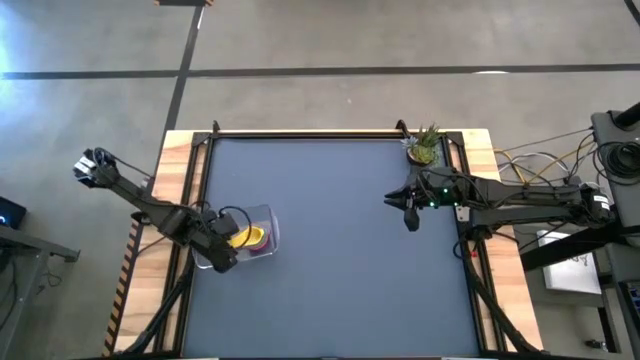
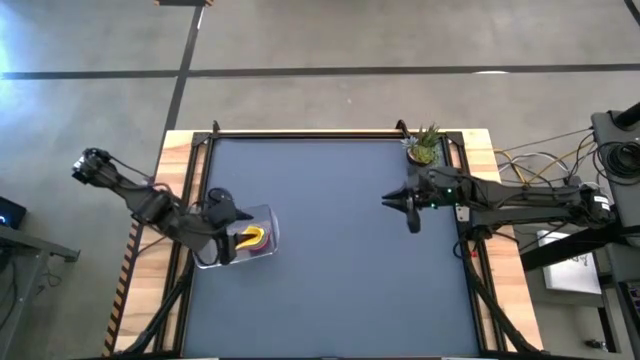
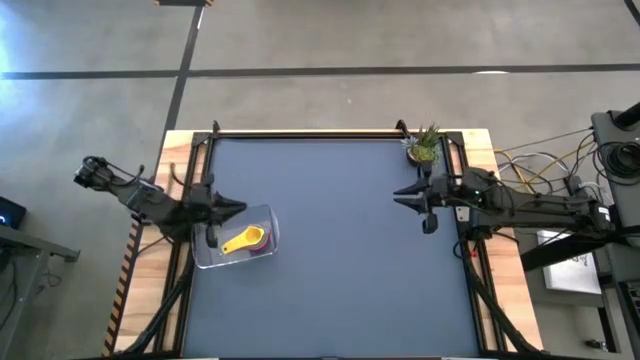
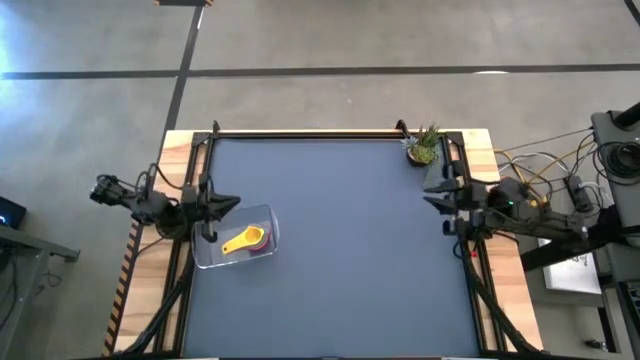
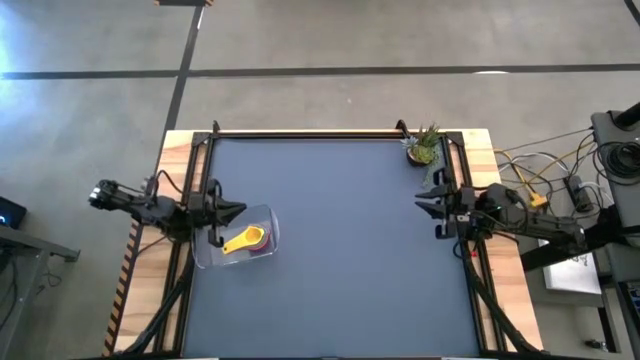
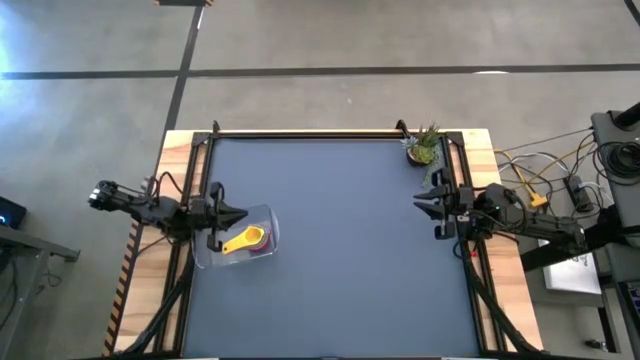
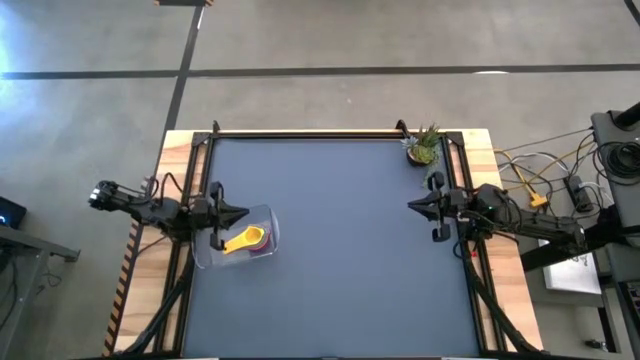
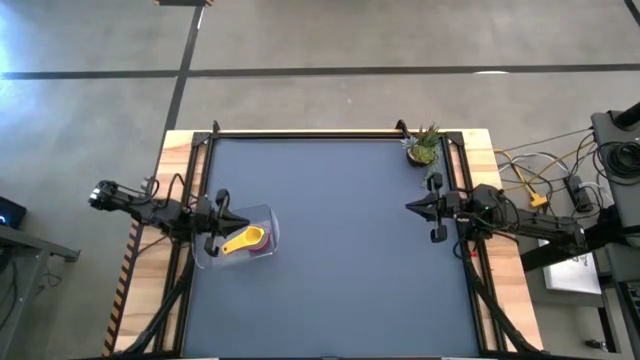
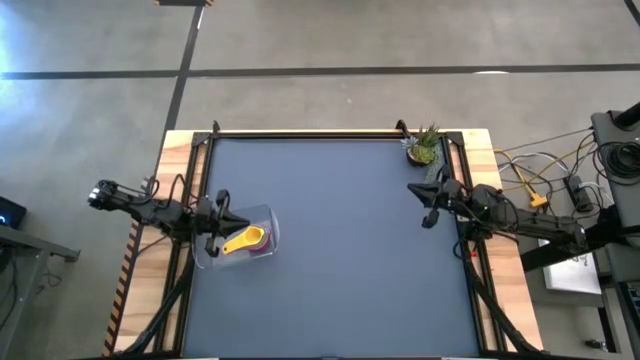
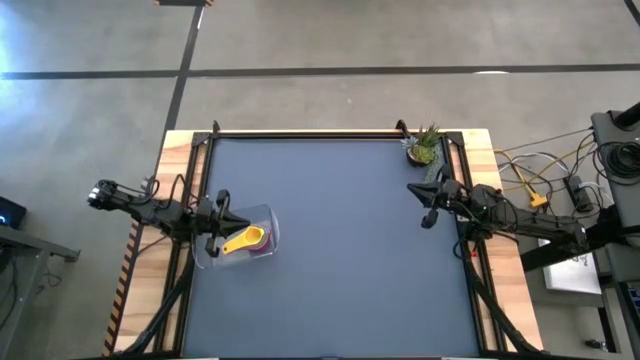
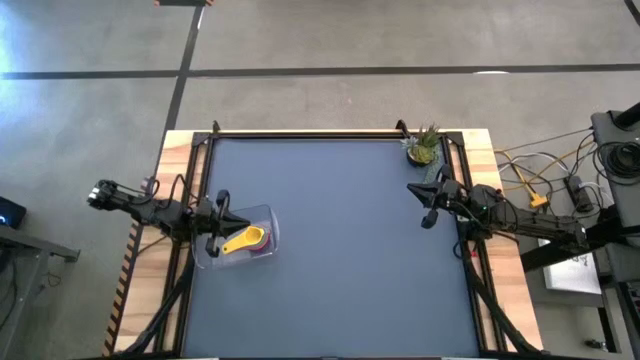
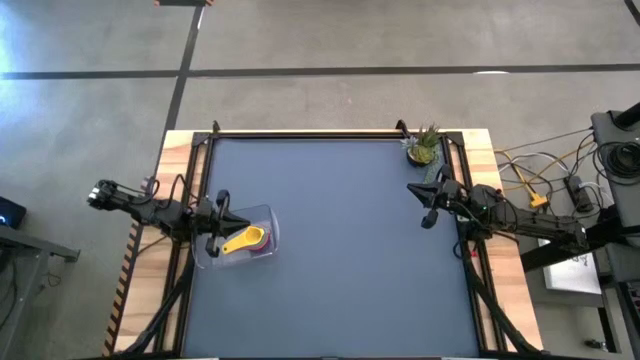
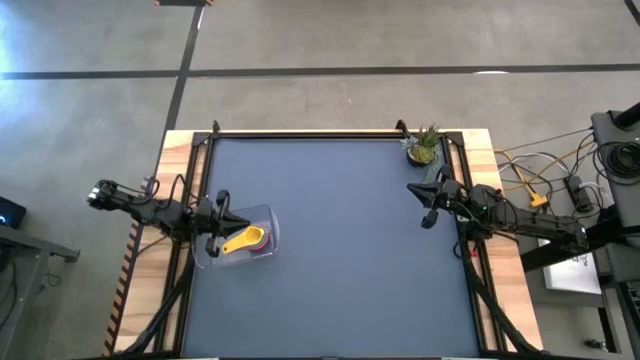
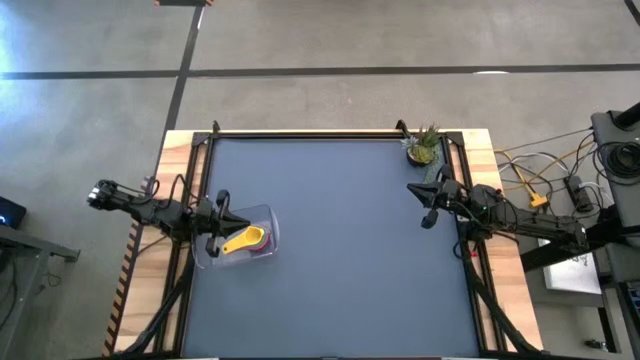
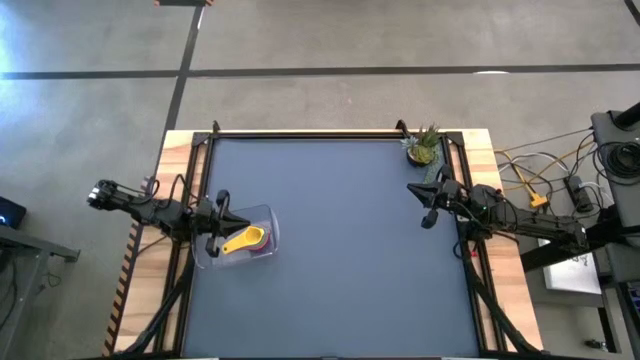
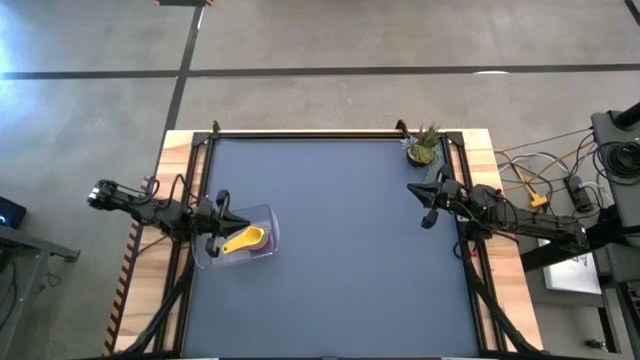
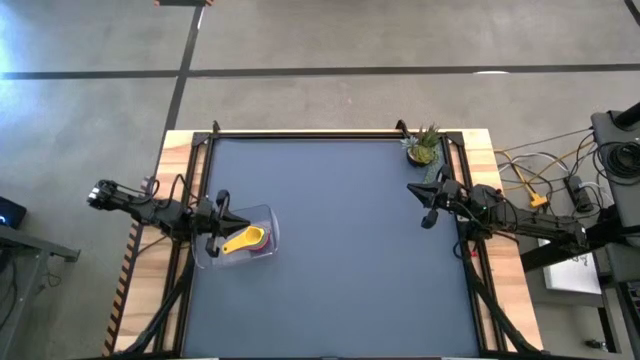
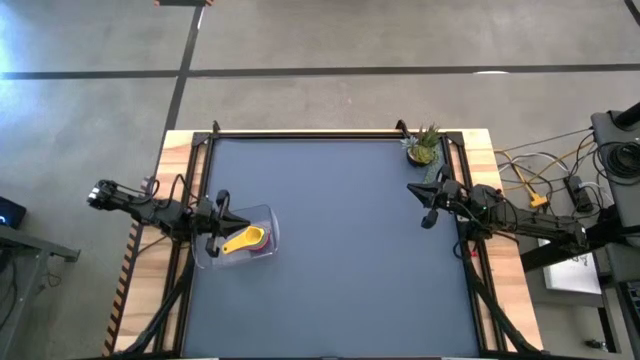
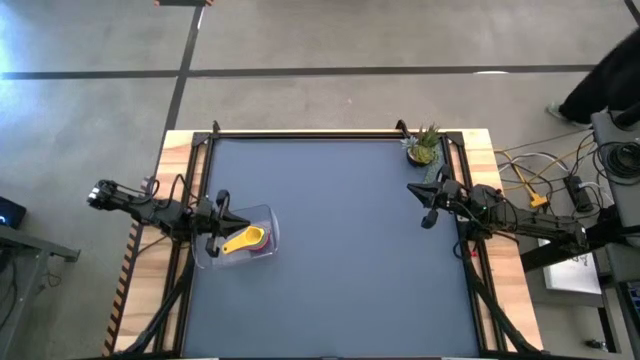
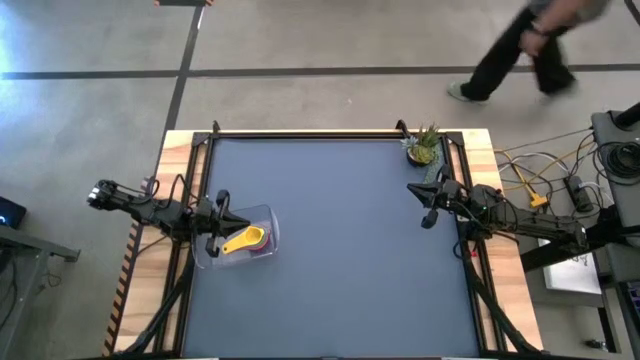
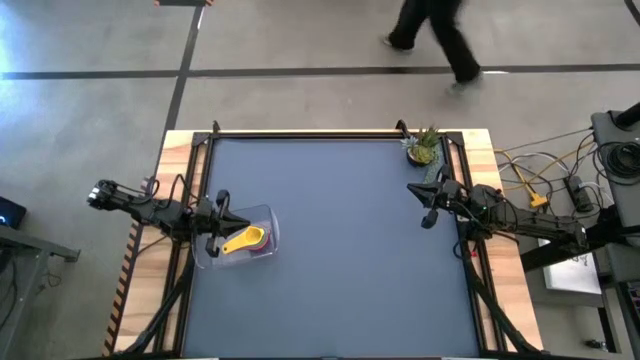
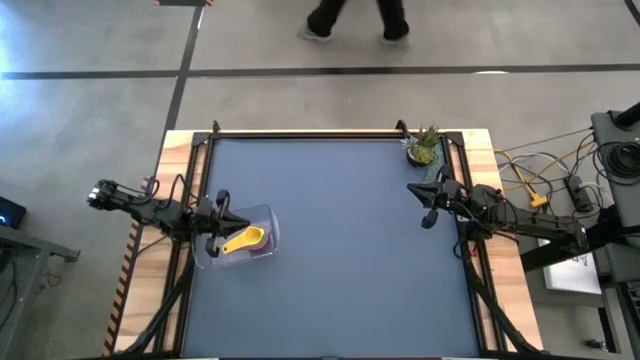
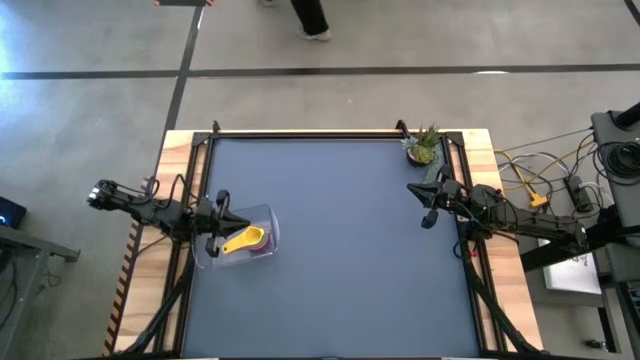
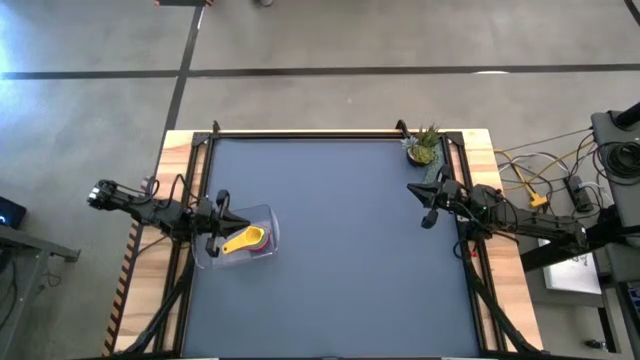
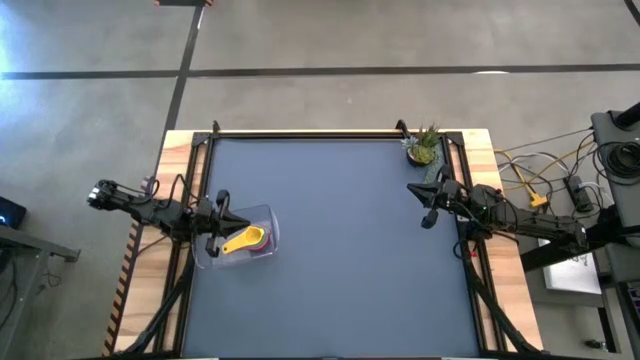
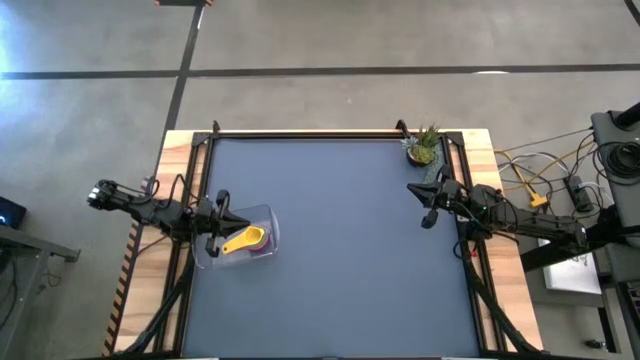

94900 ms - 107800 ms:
Task: Nest measuring cups in basket
Return to Home Position

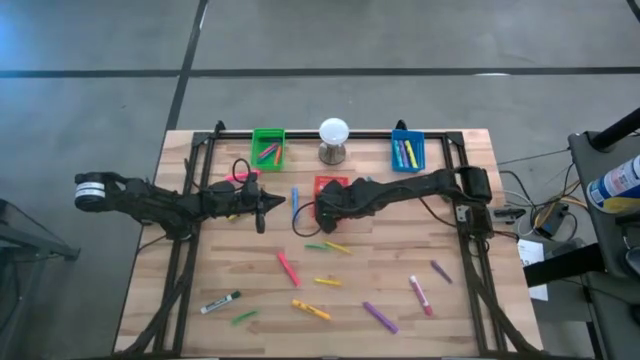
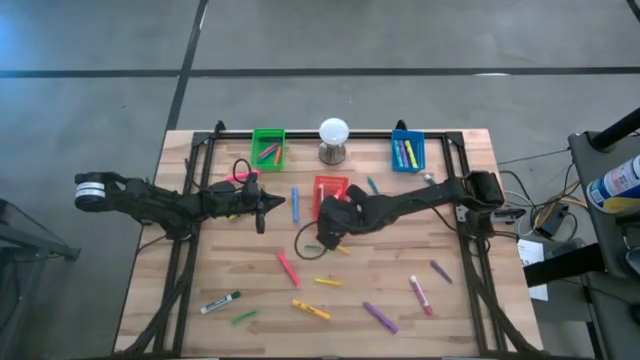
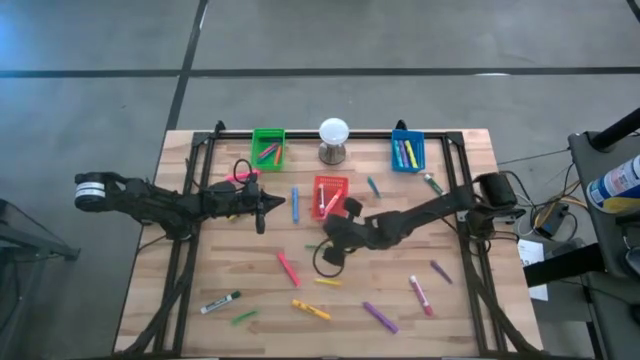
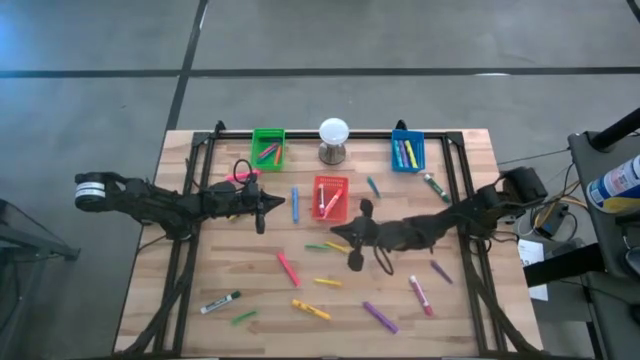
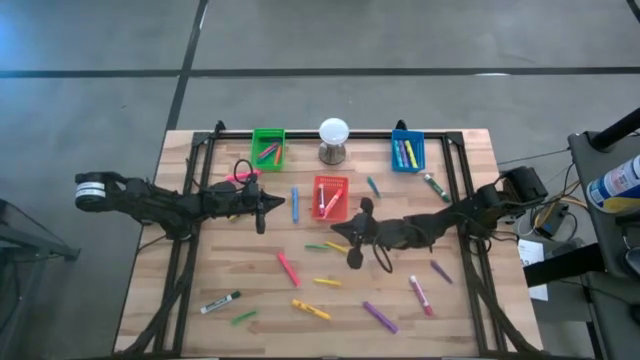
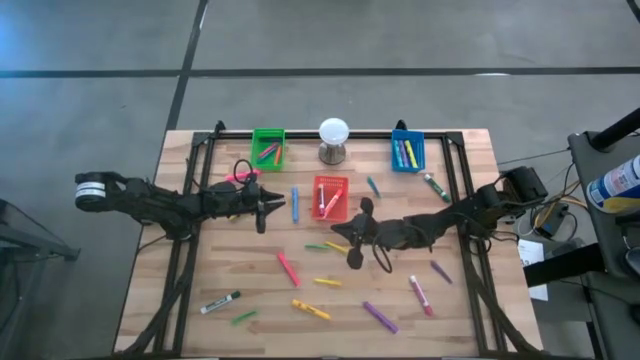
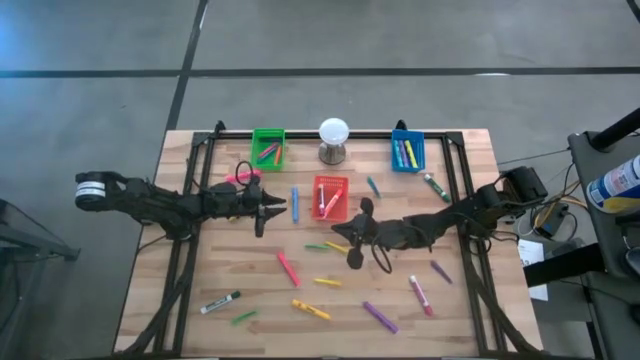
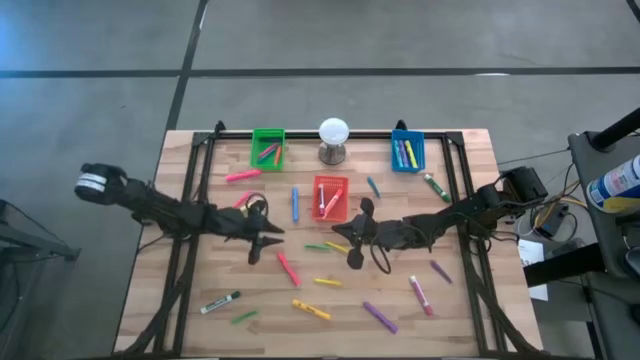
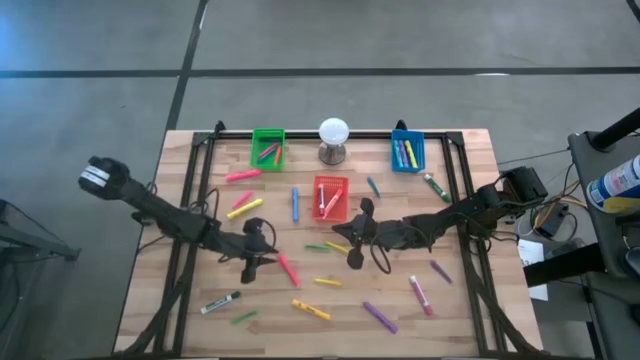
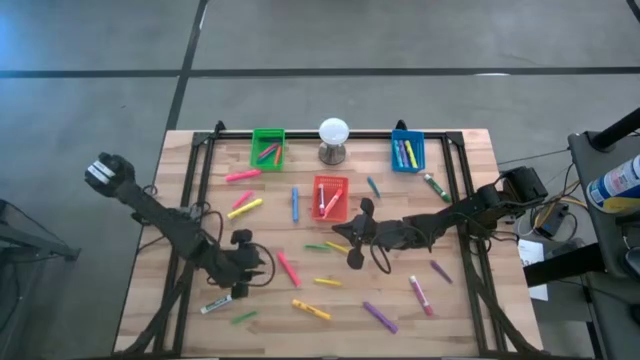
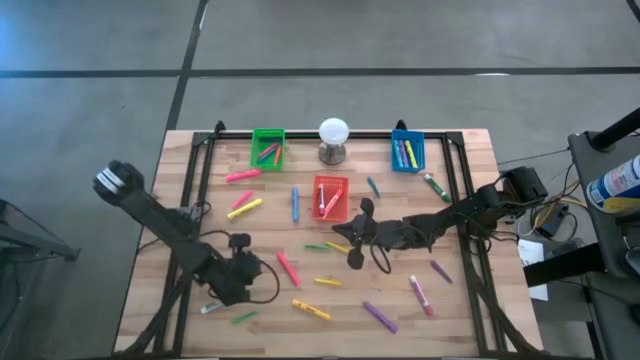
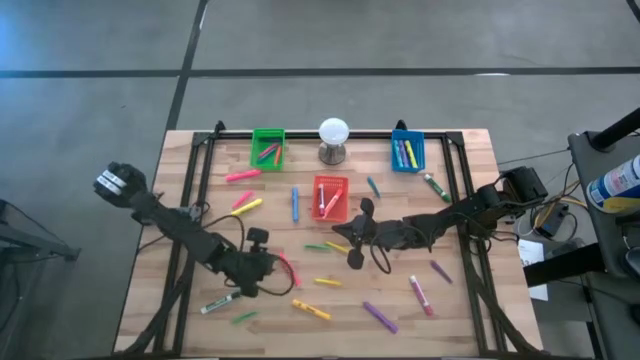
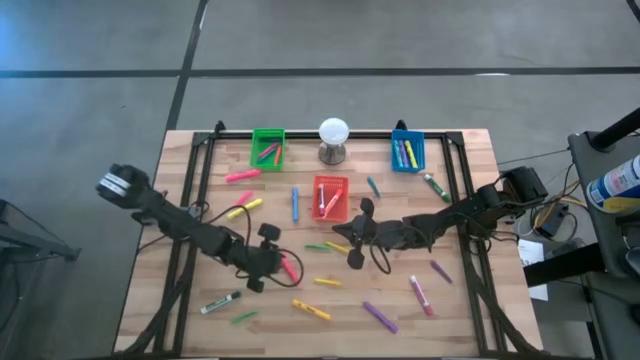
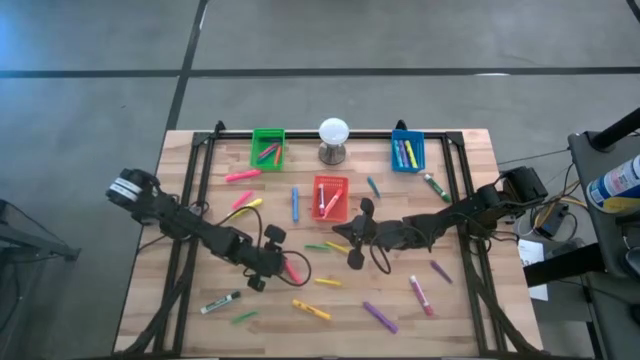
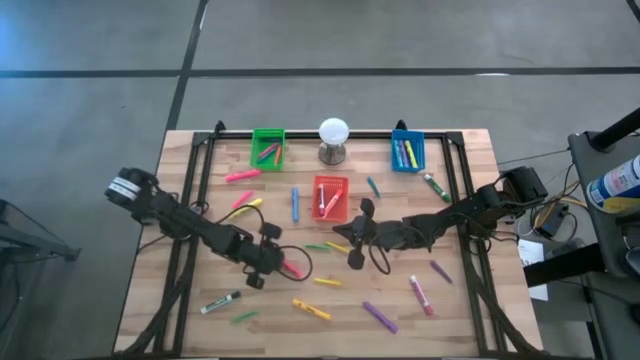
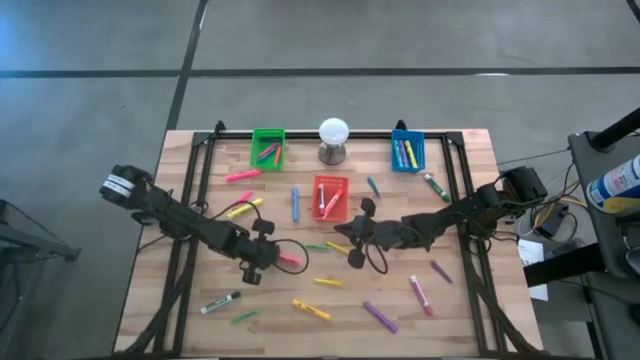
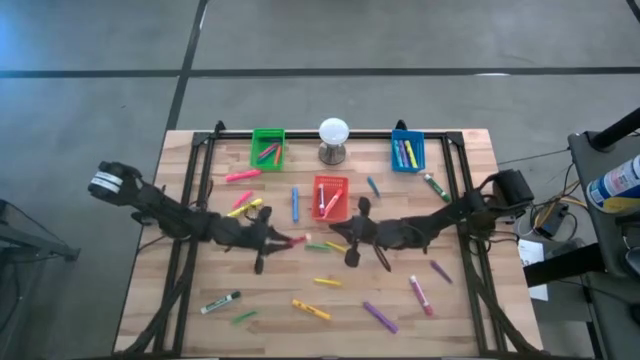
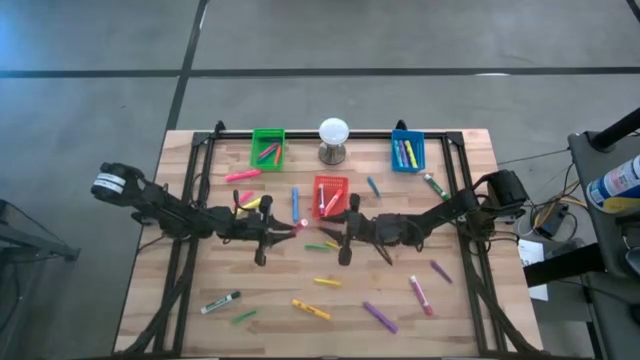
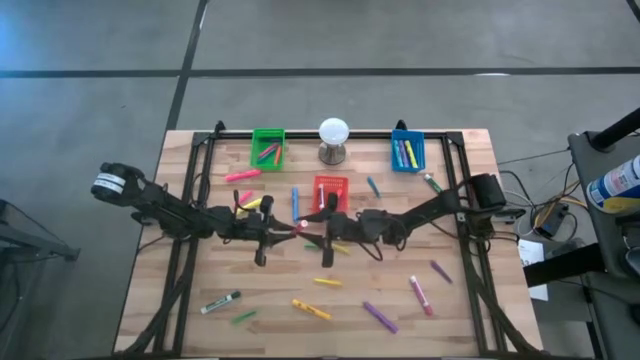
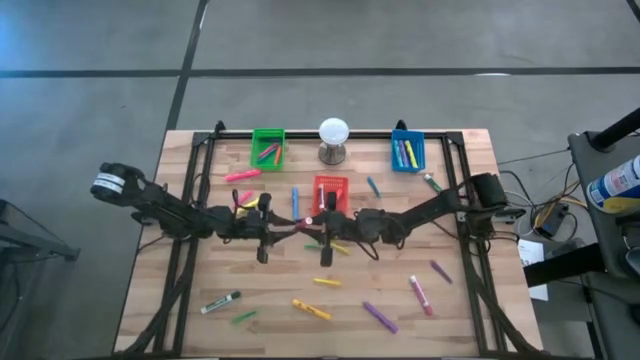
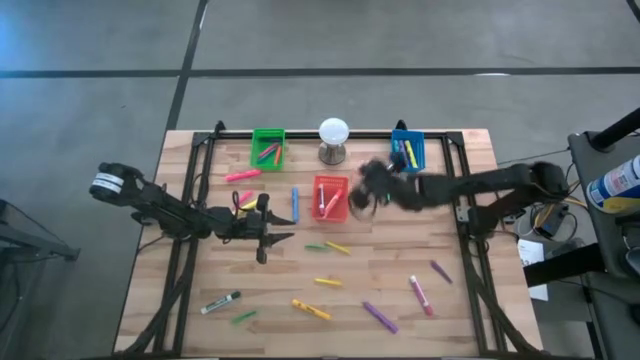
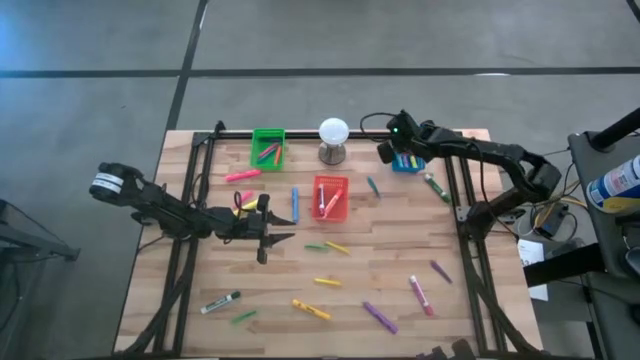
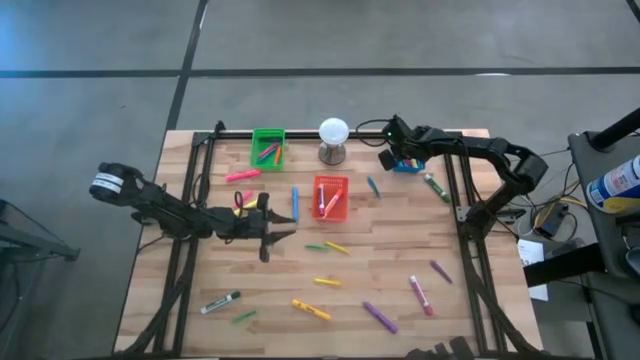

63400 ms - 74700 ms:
Task: Pick & Place Markers
Put the orange highlighter into the blue bin
